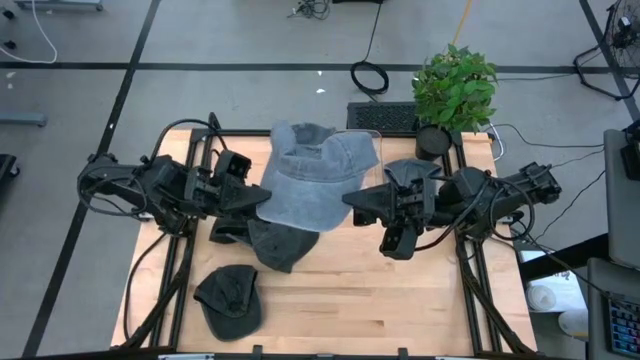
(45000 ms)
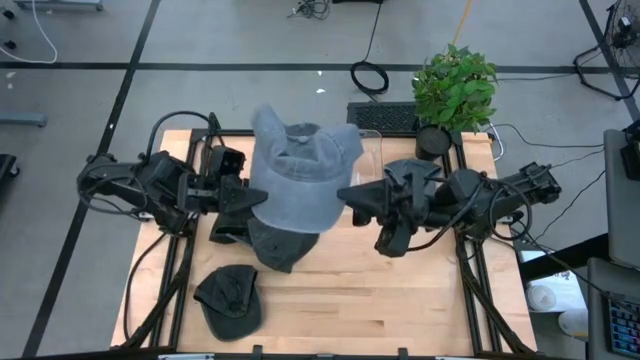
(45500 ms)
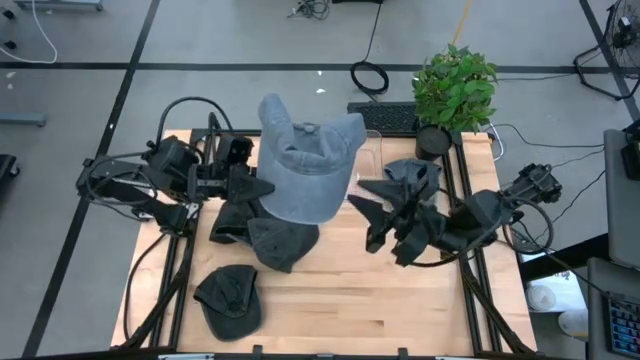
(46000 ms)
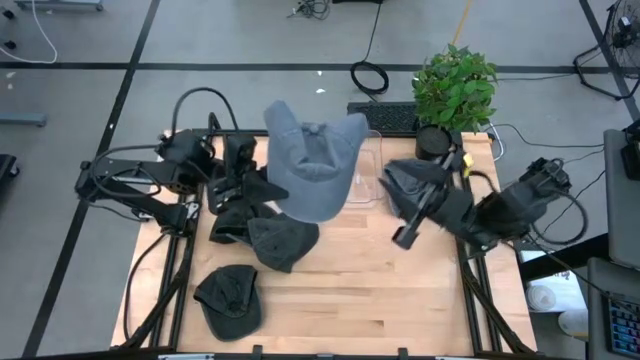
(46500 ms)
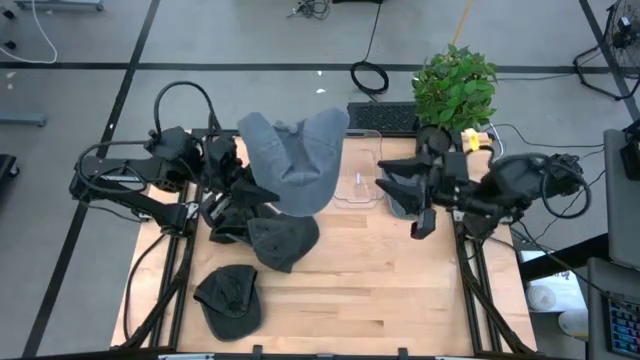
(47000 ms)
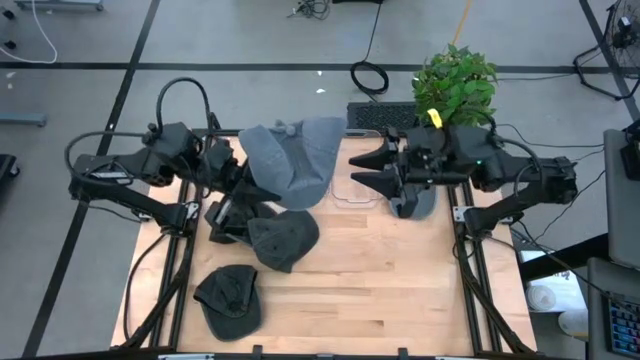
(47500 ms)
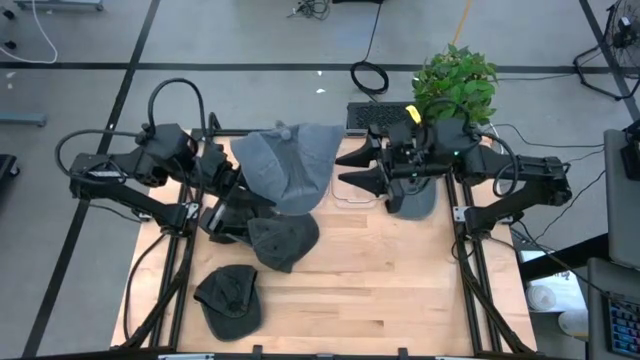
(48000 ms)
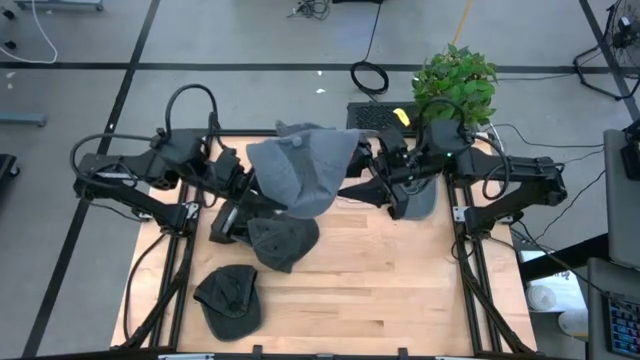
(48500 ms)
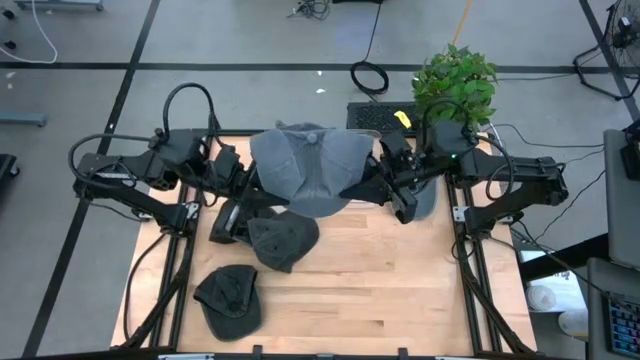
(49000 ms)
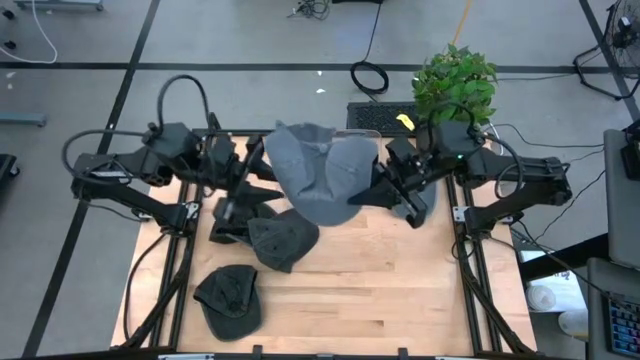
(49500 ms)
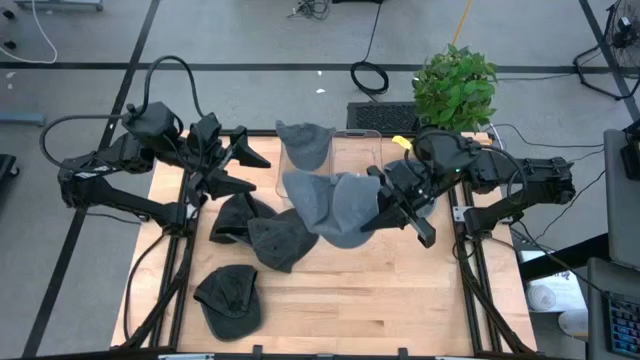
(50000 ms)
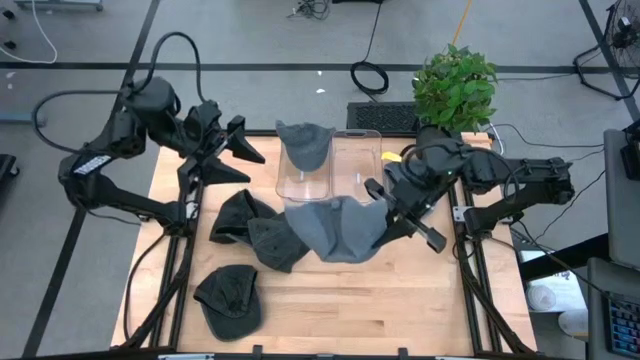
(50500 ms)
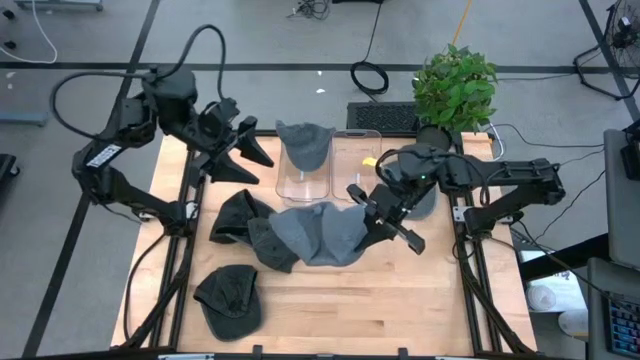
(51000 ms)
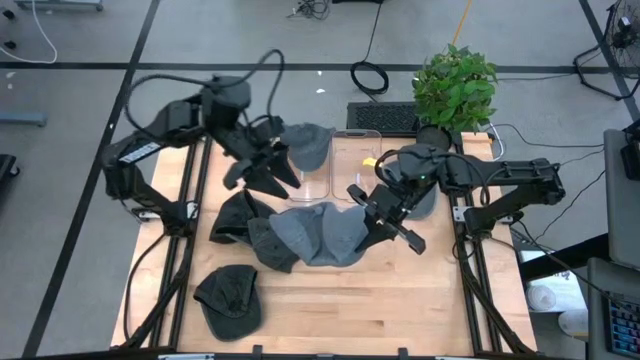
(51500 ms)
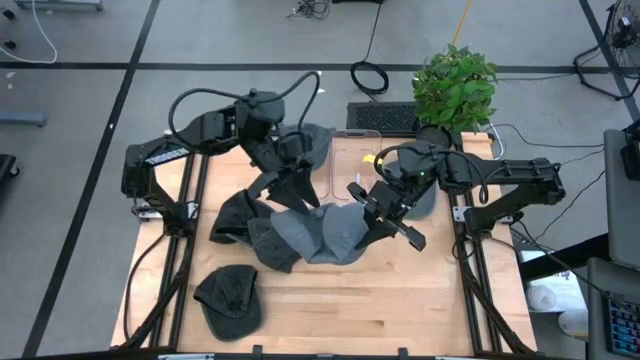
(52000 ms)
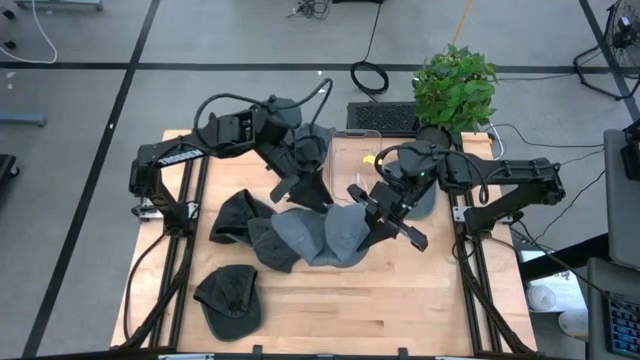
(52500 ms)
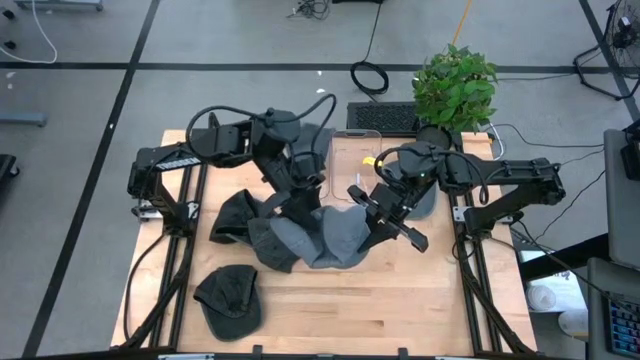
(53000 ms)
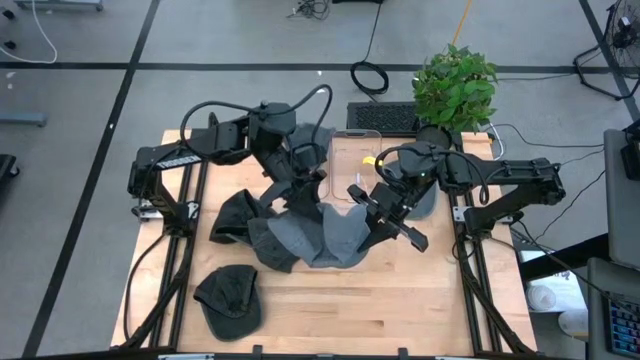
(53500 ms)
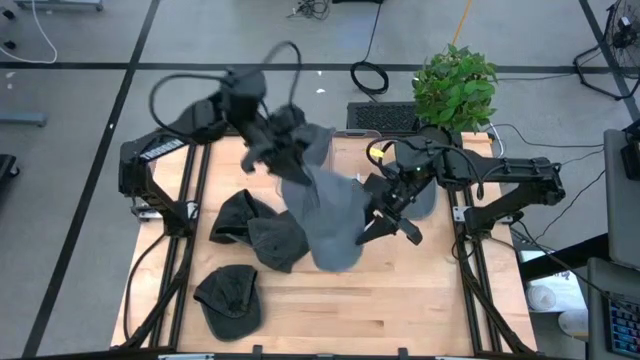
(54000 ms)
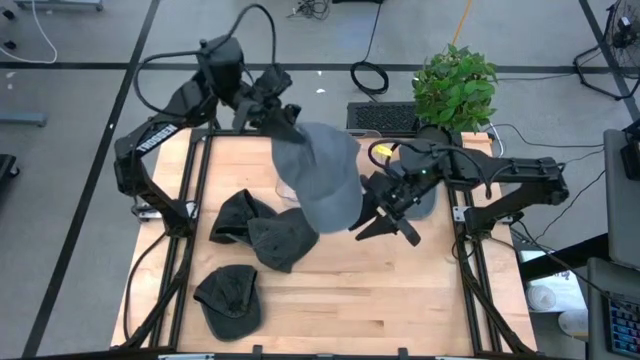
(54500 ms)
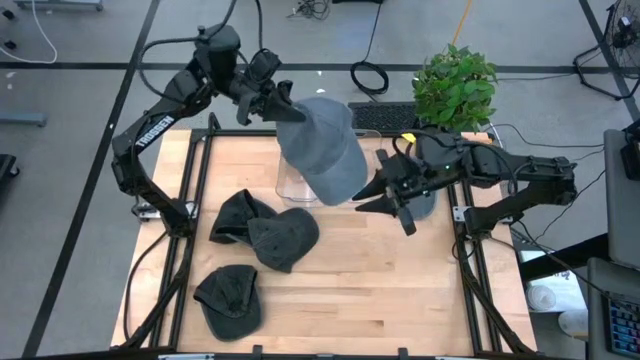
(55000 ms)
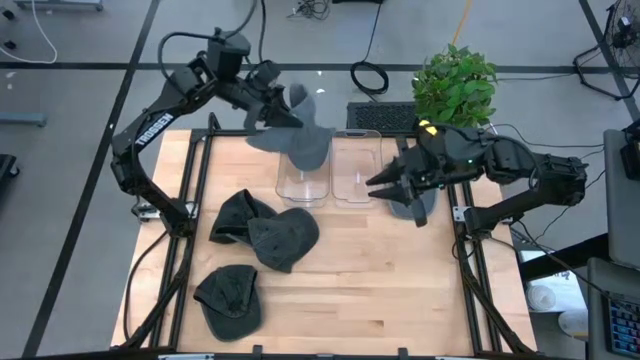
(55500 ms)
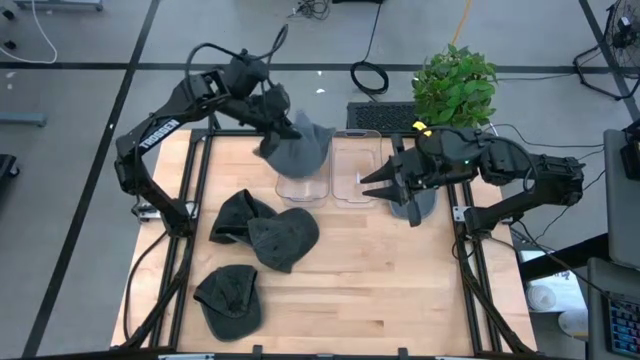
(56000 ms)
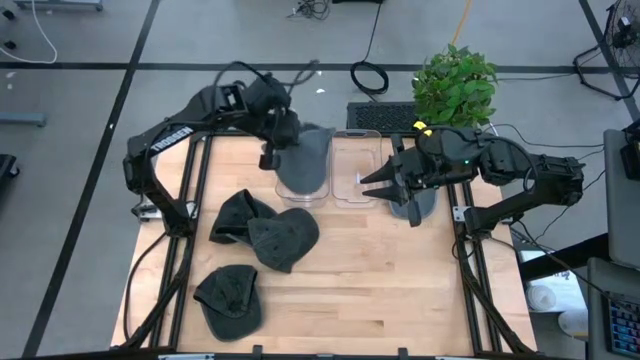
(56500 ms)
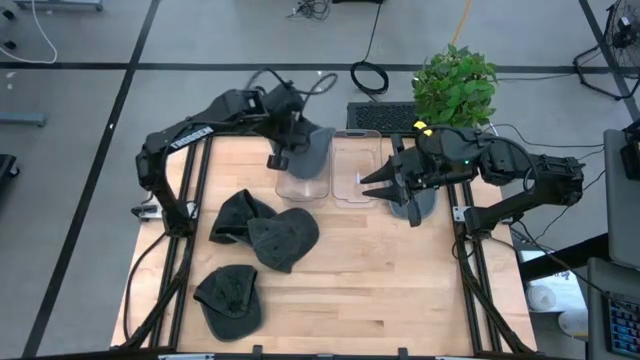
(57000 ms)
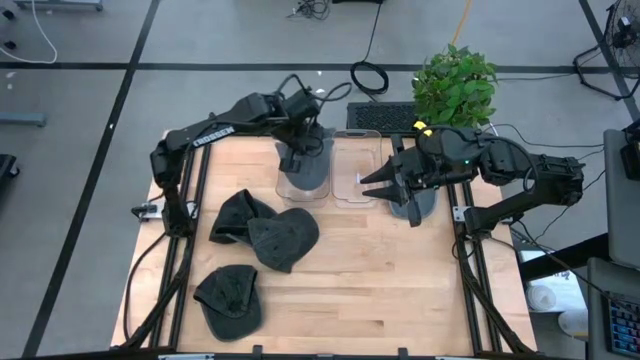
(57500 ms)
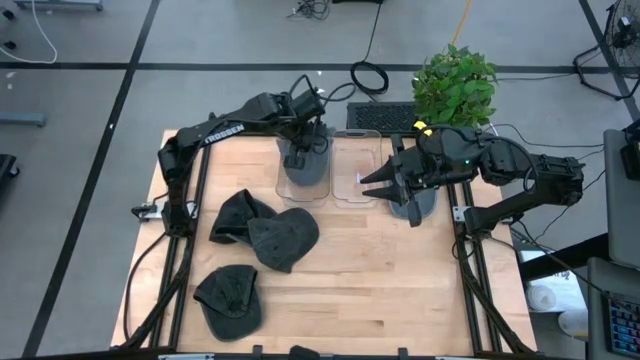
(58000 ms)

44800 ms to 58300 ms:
Task: Pick & Place hat
Put the bottom gray cap into the left transparent bin

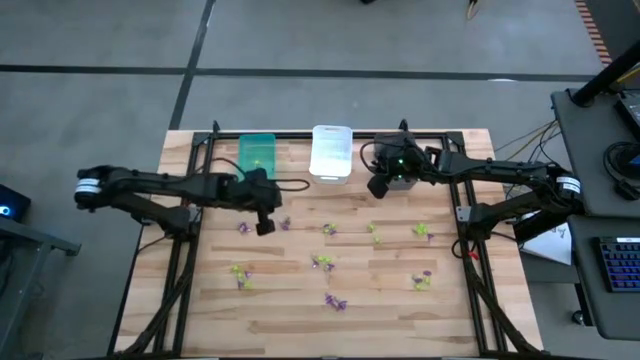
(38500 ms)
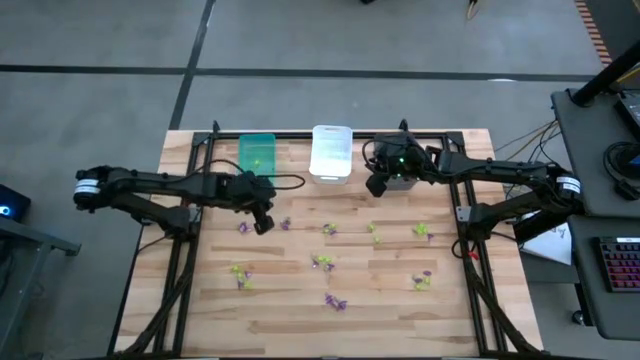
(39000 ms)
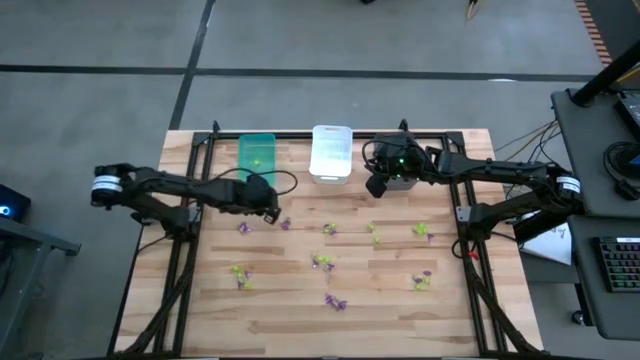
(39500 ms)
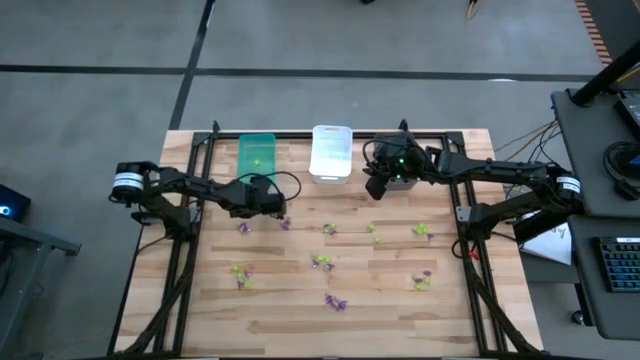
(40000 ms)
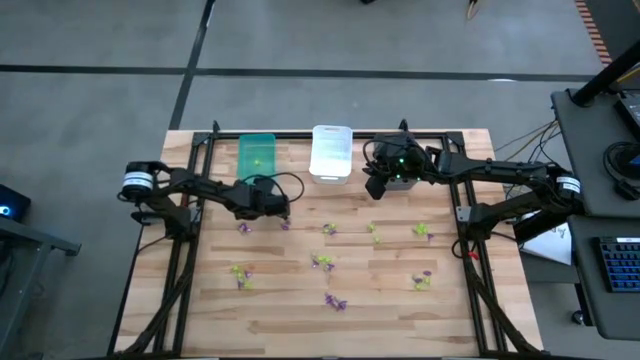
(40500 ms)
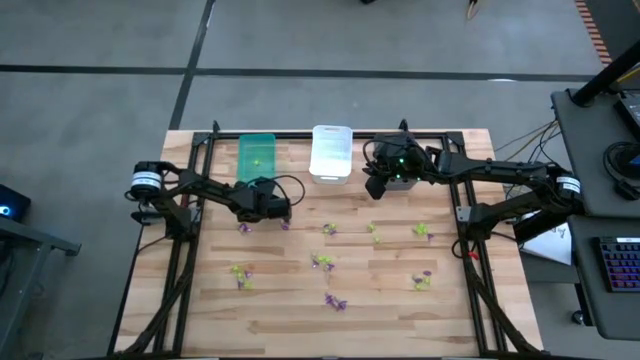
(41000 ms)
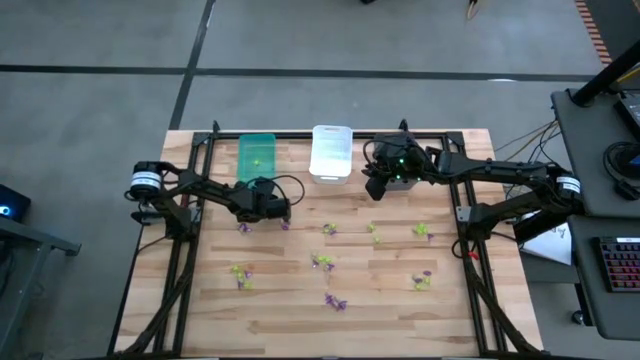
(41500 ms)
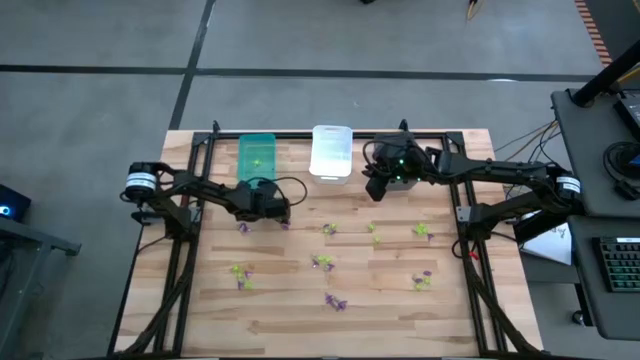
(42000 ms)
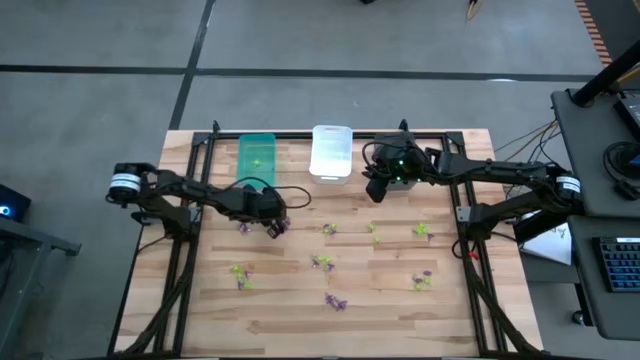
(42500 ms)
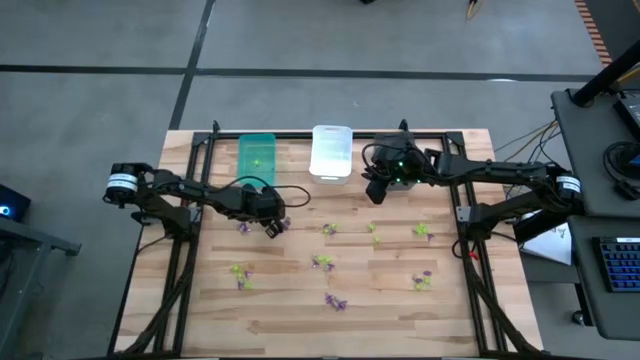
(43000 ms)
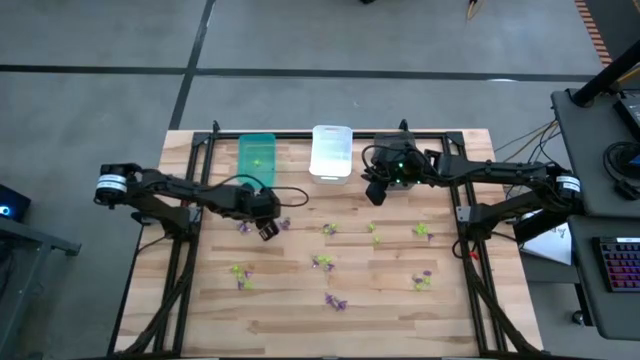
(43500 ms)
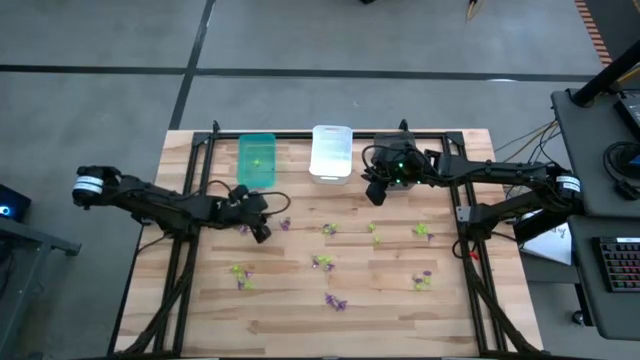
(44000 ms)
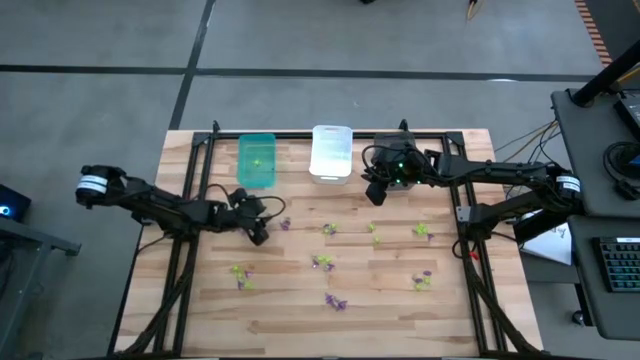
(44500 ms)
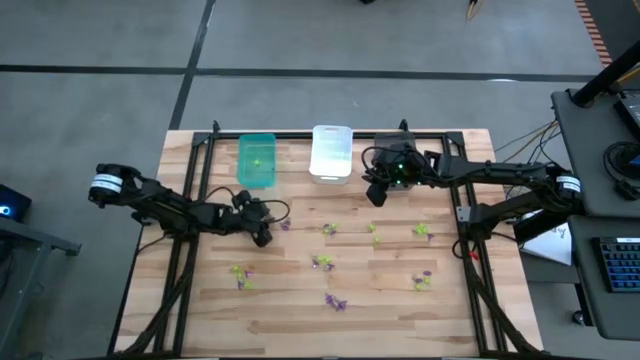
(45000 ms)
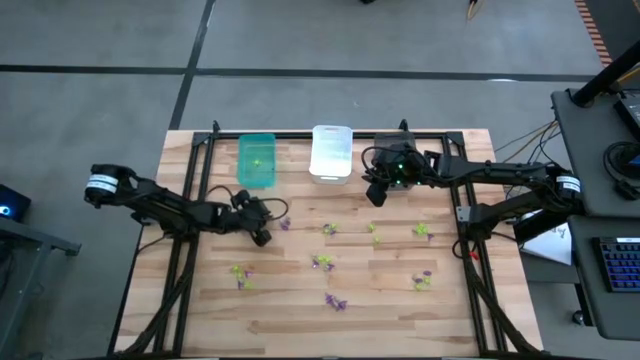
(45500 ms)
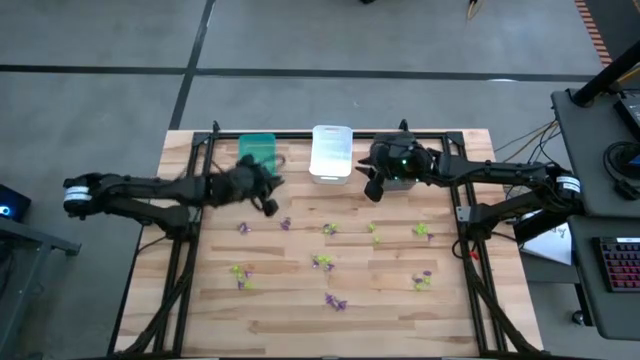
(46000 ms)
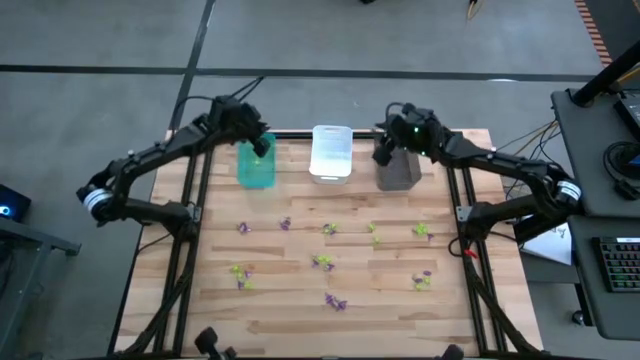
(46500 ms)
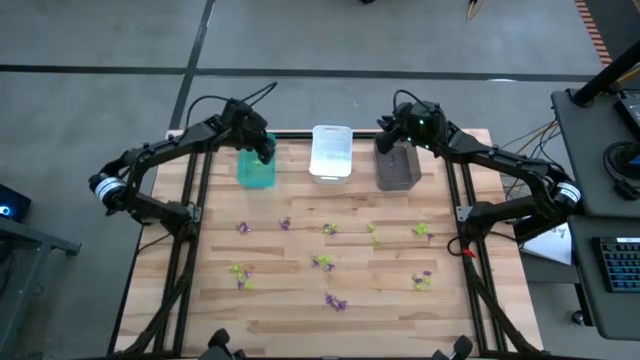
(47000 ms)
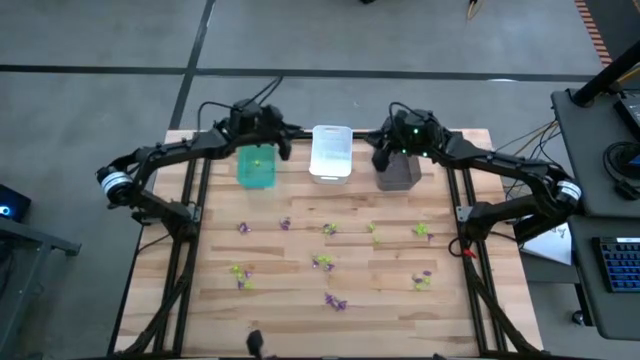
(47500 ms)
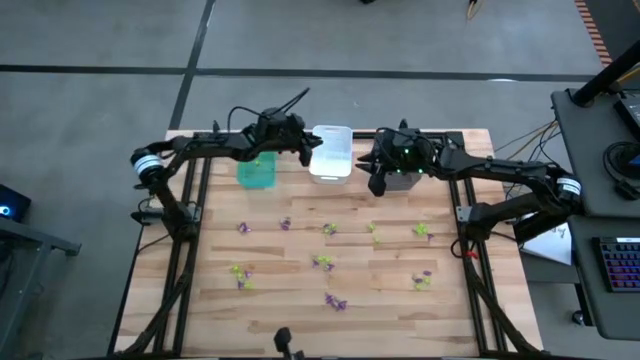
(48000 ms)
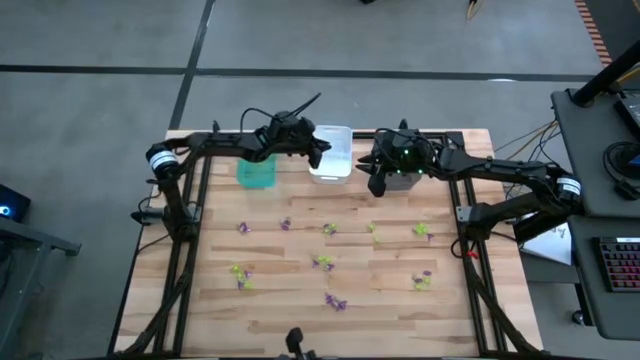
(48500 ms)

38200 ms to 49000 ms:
Task: Sort Halloween decoration
Put the white skull toy into the white bin
